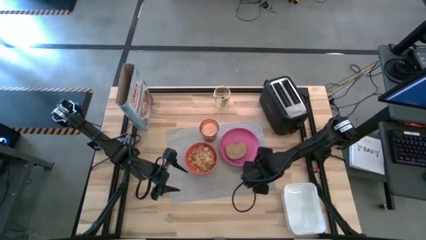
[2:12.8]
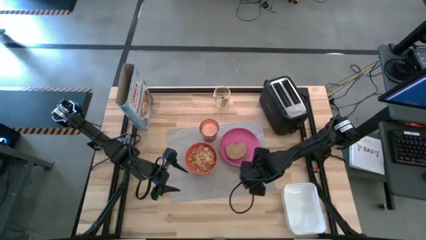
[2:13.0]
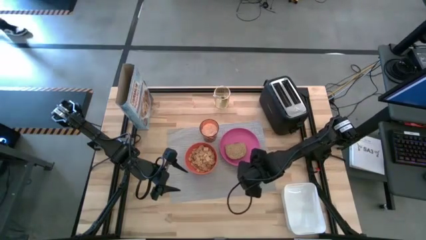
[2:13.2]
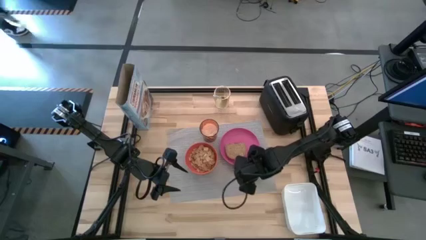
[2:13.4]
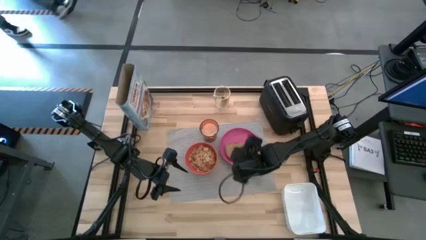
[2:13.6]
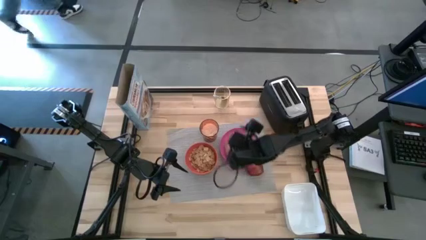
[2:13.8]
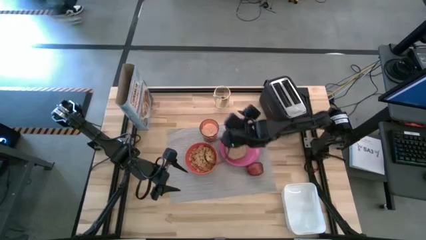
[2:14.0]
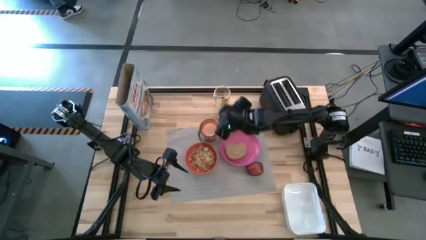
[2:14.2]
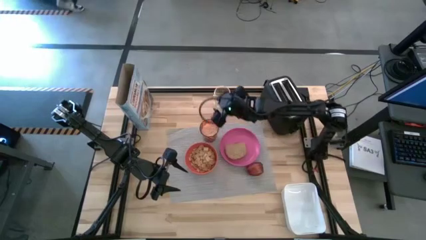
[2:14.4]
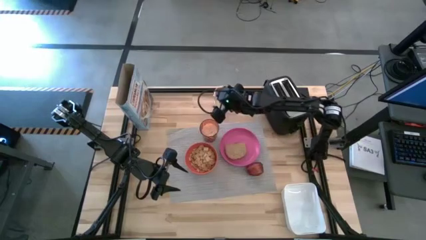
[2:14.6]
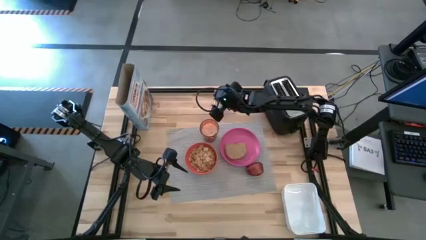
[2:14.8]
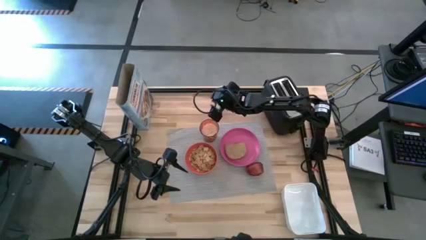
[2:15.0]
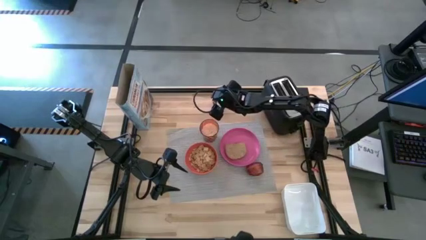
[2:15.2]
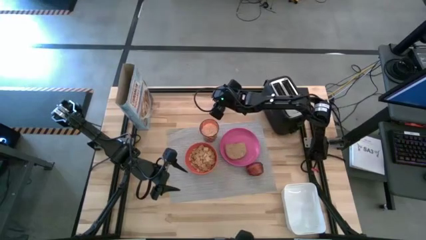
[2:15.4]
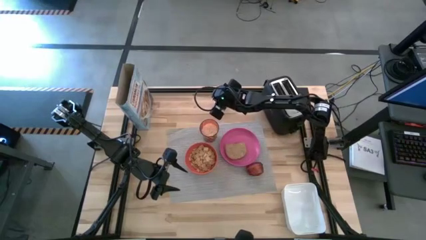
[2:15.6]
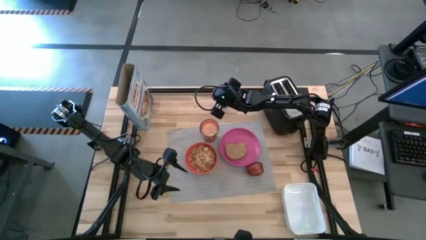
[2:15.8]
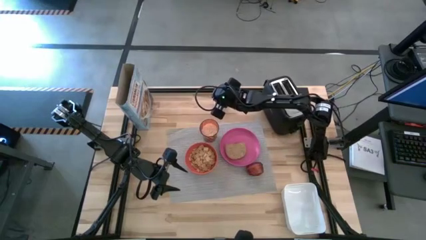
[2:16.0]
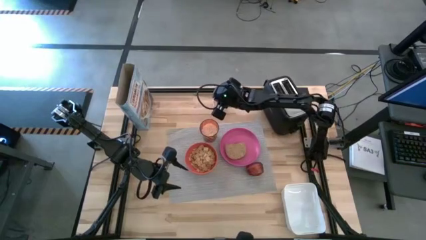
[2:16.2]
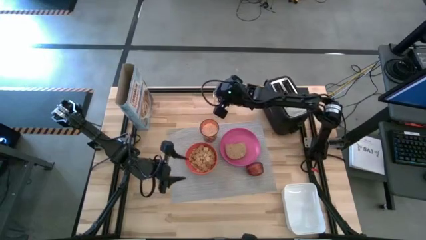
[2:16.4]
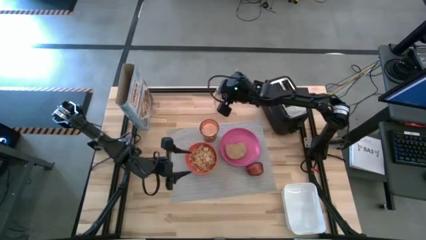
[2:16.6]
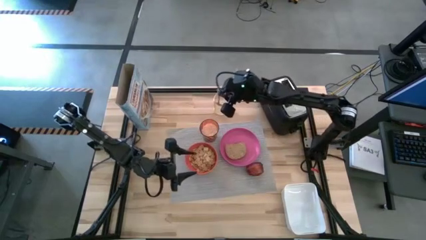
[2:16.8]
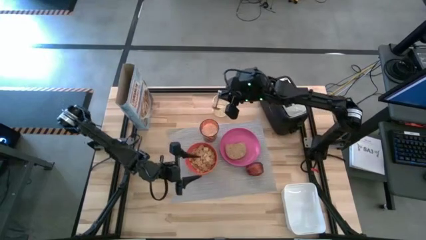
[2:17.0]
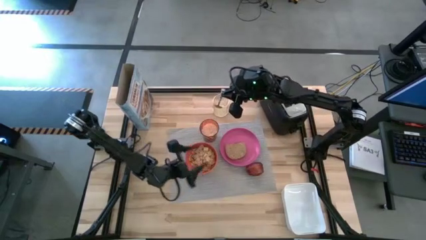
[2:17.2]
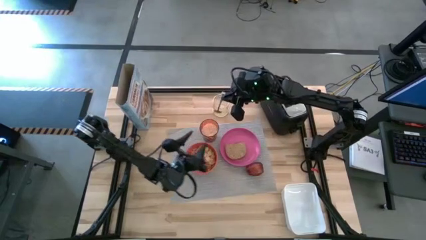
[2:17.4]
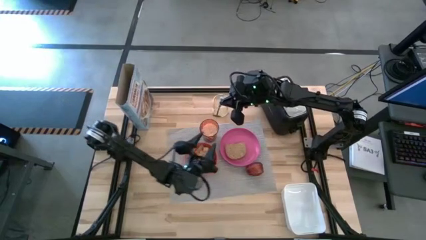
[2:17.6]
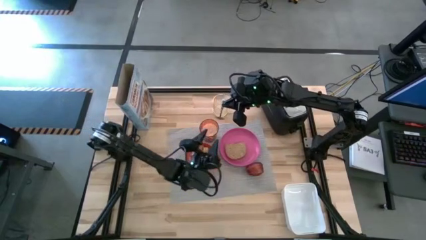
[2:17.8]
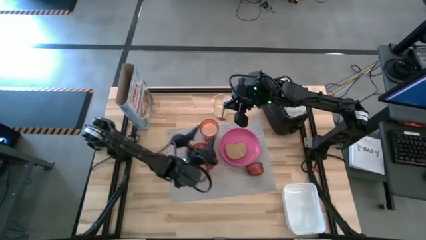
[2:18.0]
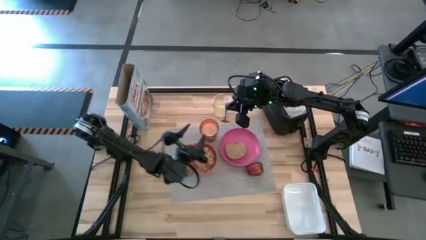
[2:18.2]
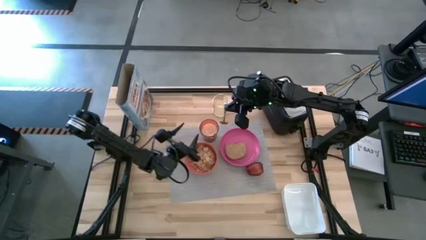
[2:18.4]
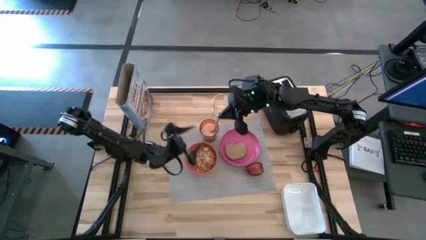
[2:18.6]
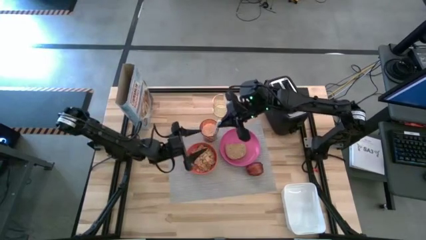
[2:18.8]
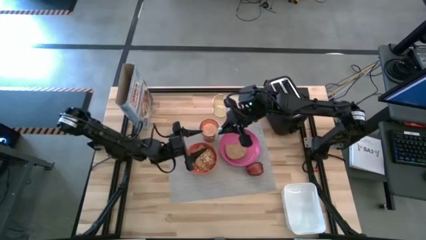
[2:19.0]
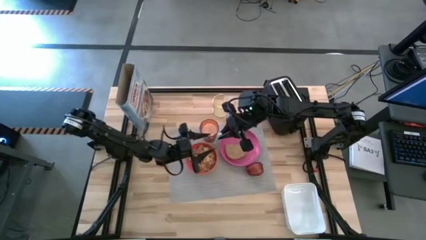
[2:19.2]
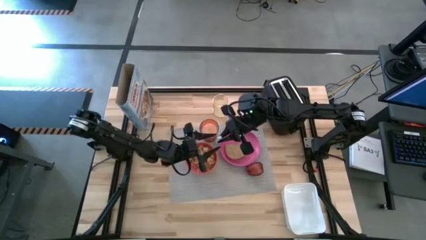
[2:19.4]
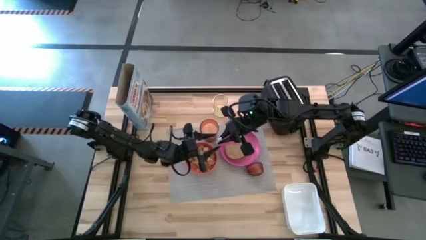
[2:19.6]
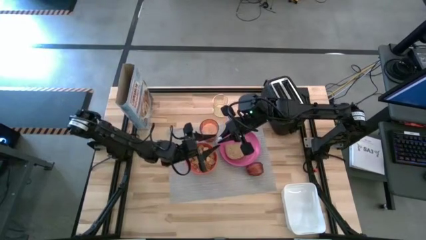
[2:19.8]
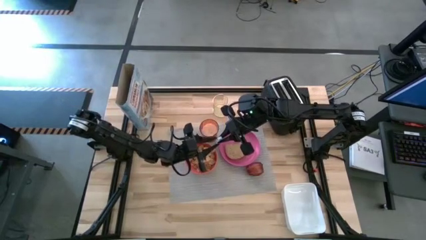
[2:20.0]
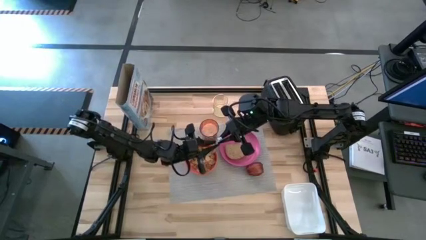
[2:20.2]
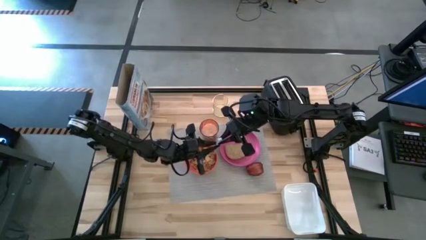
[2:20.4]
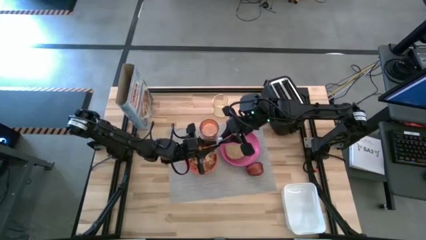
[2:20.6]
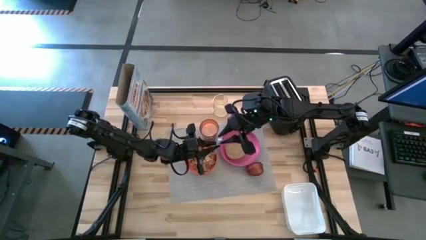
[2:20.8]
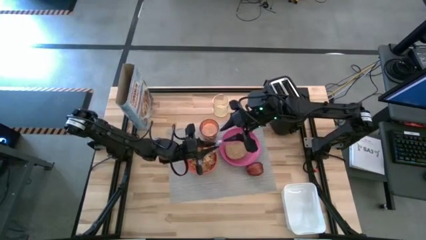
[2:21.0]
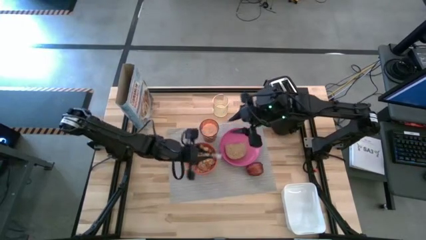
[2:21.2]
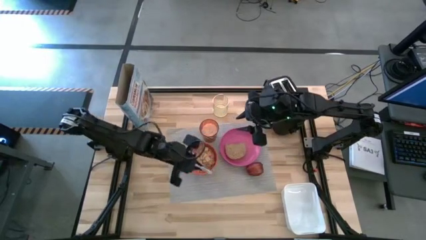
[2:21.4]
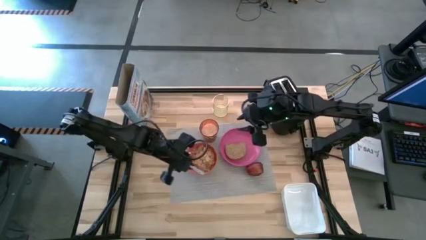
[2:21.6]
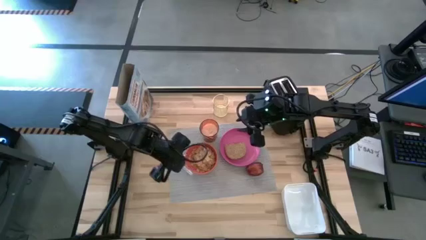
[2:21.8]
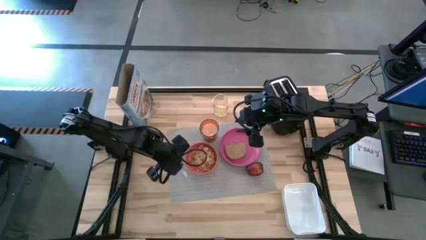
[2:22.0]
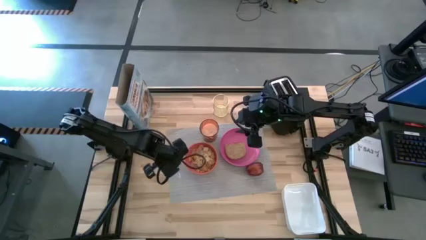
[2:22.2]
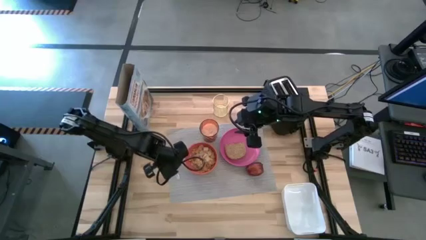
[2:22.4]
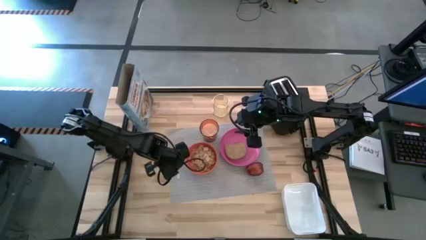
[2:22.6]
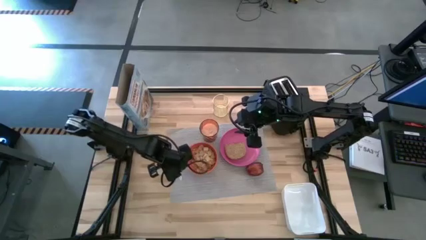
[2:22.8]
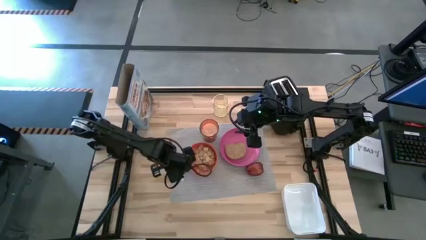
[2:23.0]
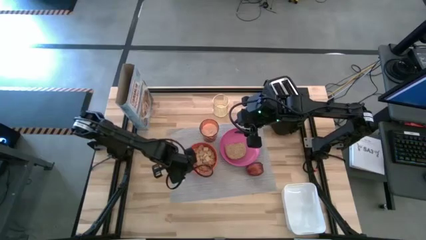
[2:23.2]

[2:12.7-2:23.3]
Task: Arrange a breakfast setting
Put the blue spoon on the gray table mat to the left of the orange bowl
